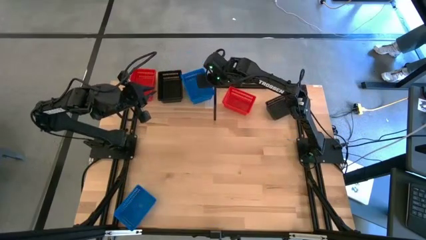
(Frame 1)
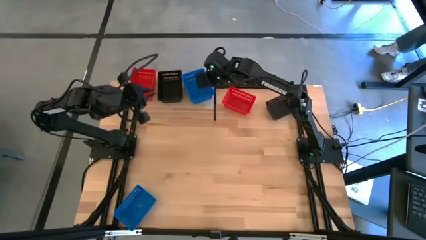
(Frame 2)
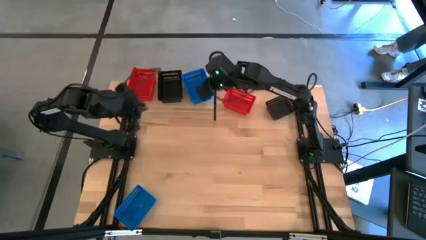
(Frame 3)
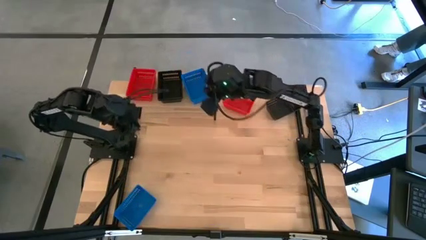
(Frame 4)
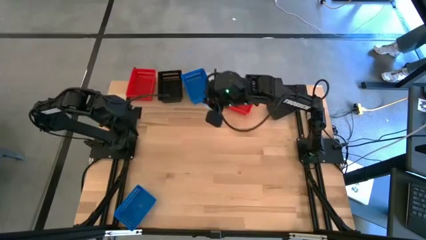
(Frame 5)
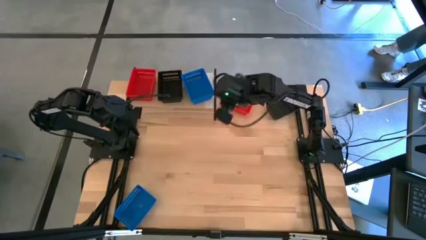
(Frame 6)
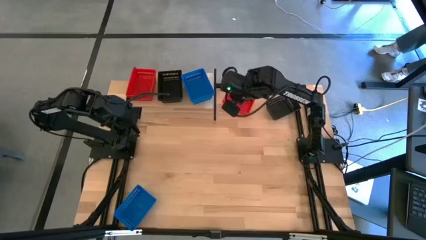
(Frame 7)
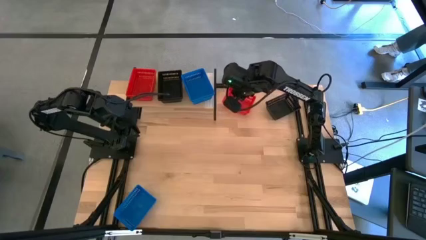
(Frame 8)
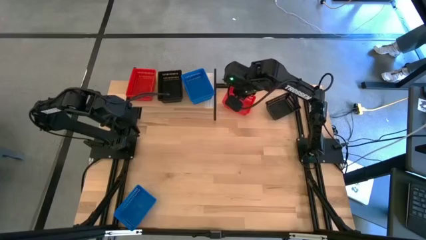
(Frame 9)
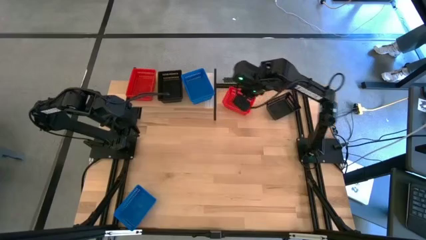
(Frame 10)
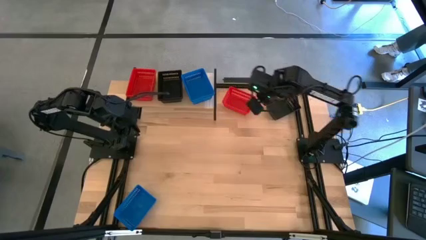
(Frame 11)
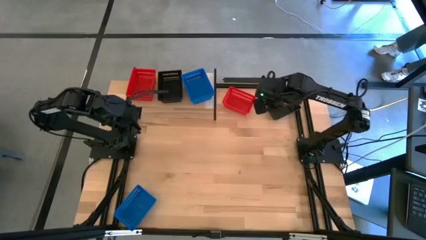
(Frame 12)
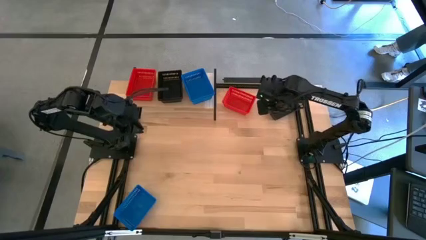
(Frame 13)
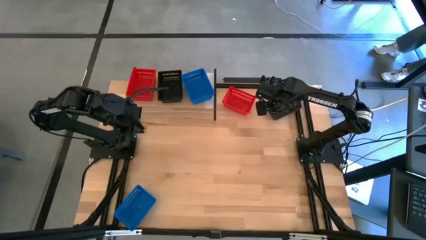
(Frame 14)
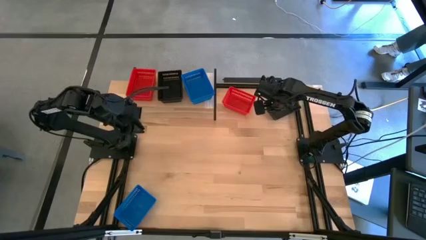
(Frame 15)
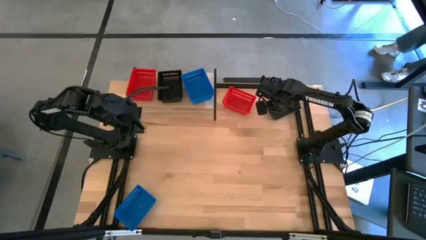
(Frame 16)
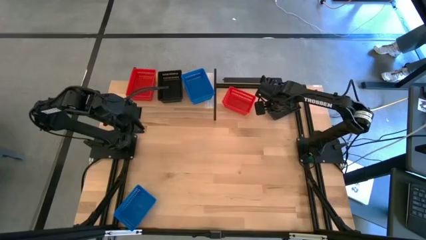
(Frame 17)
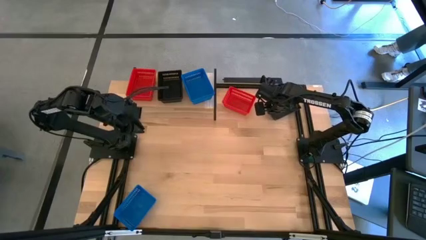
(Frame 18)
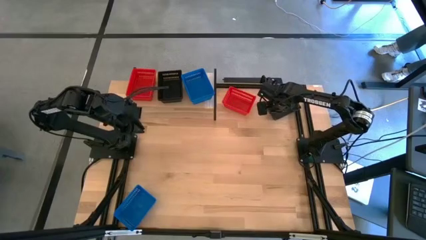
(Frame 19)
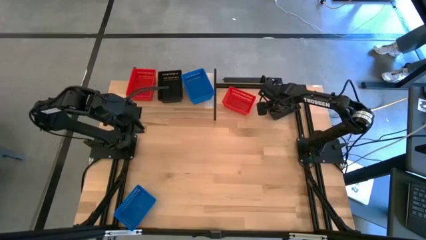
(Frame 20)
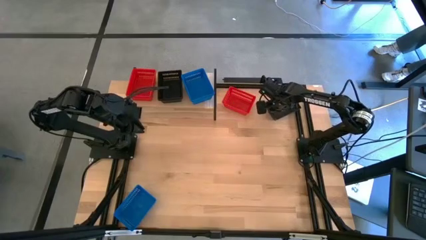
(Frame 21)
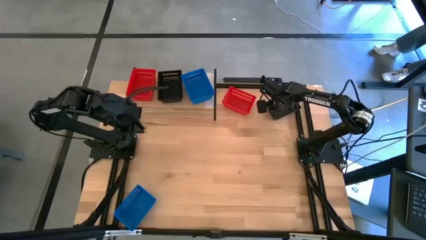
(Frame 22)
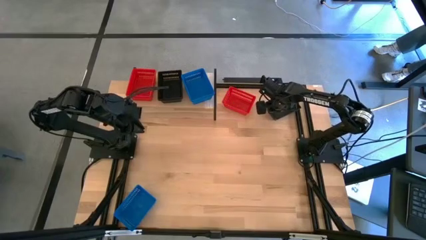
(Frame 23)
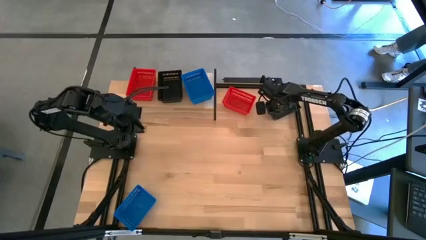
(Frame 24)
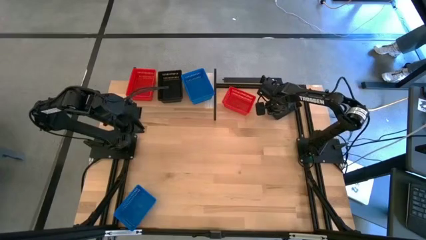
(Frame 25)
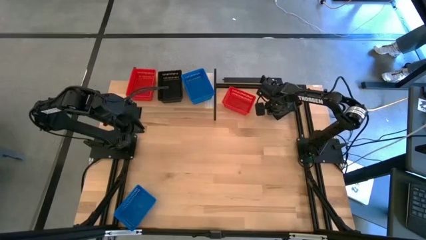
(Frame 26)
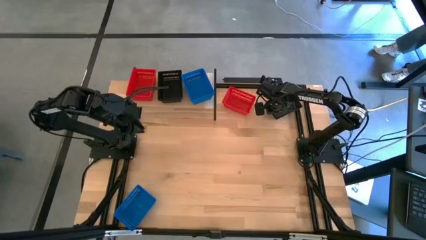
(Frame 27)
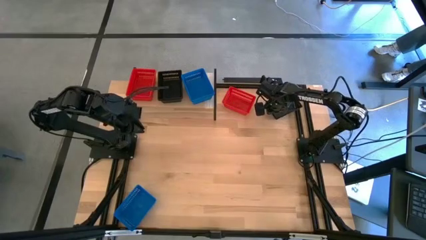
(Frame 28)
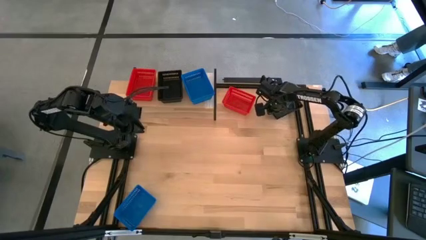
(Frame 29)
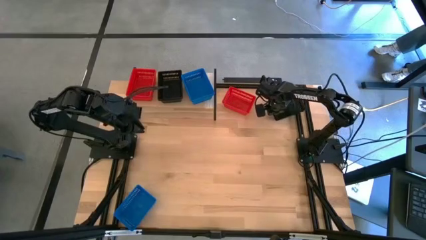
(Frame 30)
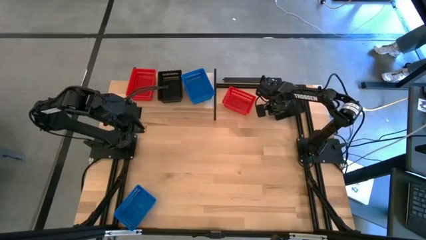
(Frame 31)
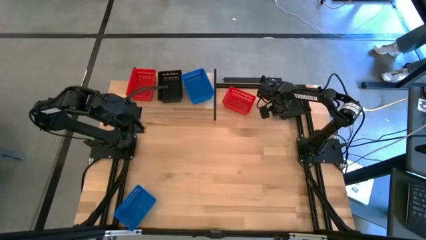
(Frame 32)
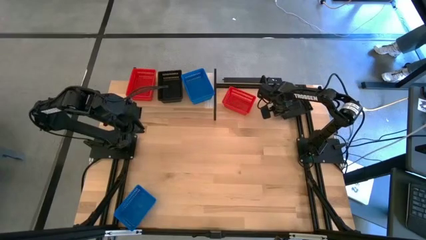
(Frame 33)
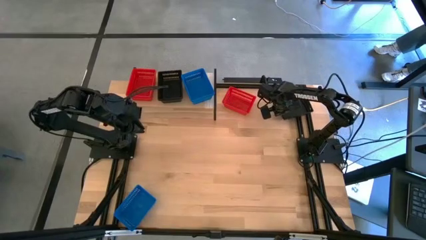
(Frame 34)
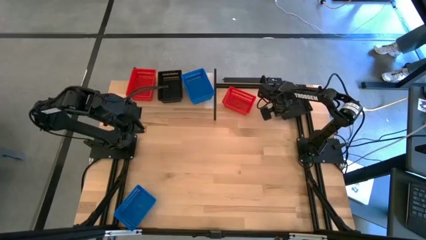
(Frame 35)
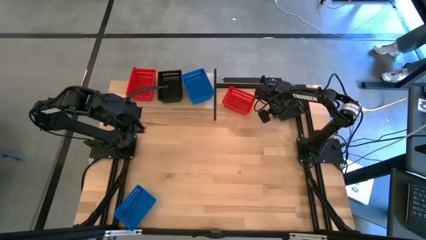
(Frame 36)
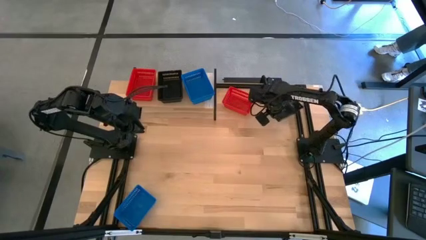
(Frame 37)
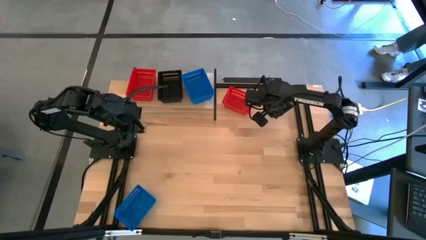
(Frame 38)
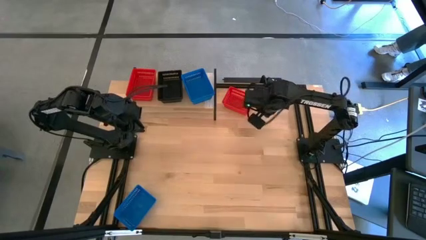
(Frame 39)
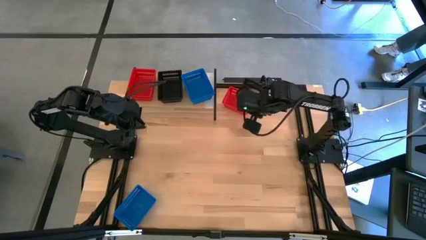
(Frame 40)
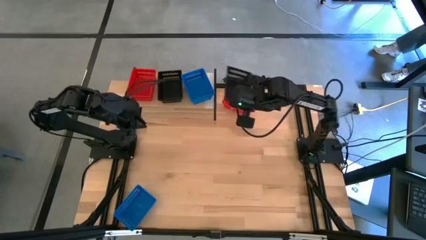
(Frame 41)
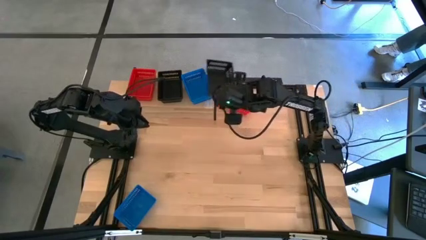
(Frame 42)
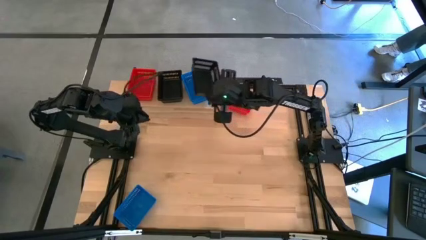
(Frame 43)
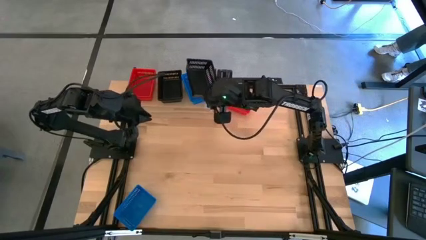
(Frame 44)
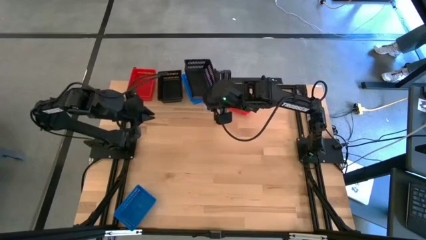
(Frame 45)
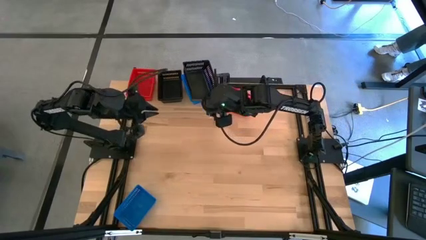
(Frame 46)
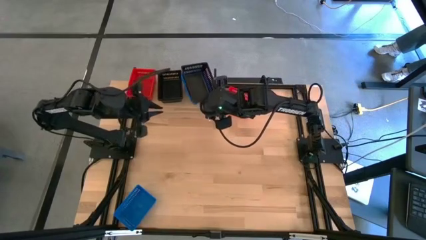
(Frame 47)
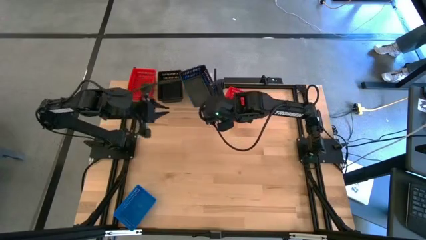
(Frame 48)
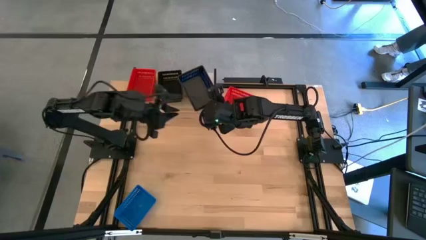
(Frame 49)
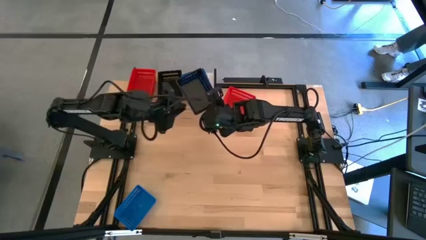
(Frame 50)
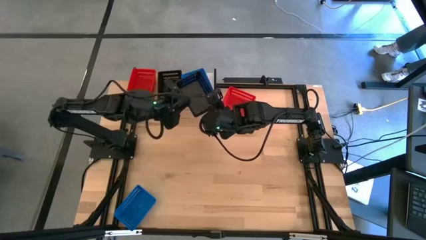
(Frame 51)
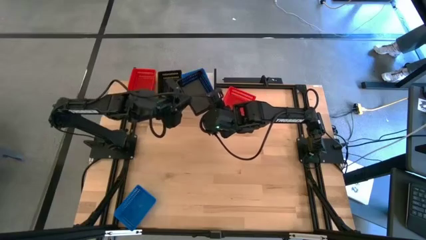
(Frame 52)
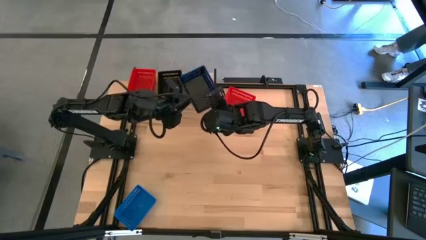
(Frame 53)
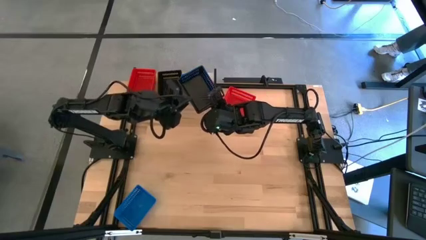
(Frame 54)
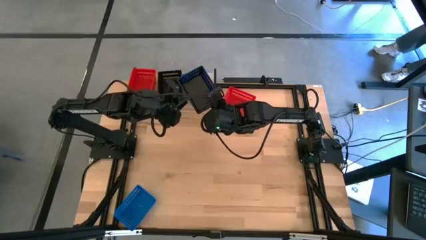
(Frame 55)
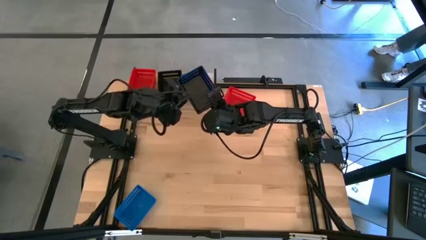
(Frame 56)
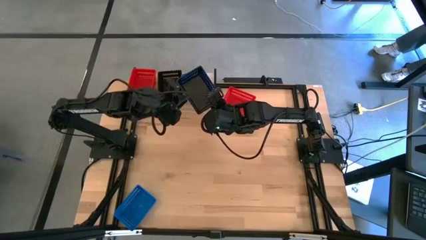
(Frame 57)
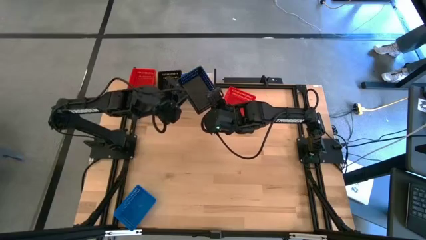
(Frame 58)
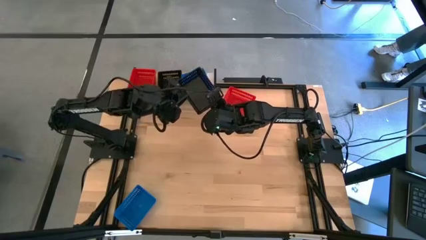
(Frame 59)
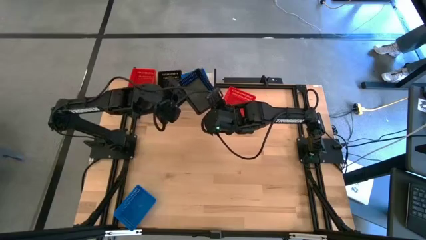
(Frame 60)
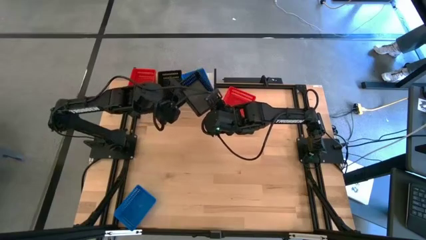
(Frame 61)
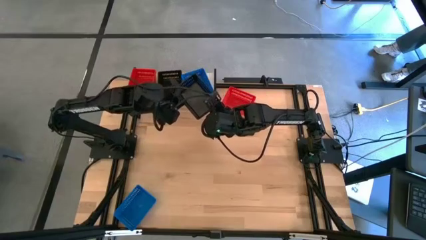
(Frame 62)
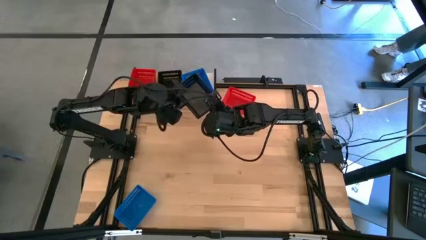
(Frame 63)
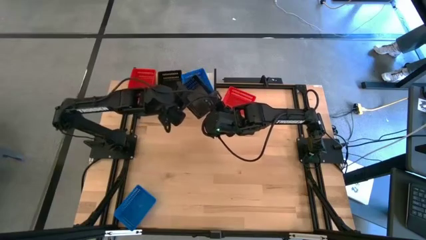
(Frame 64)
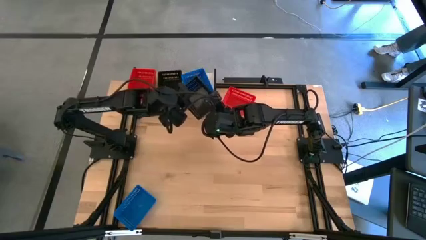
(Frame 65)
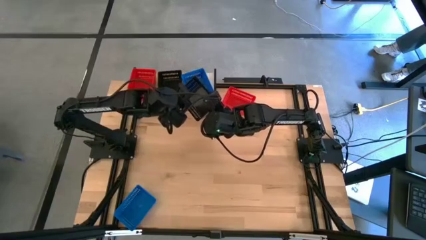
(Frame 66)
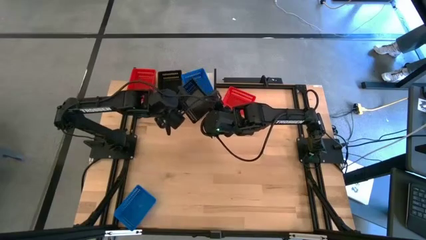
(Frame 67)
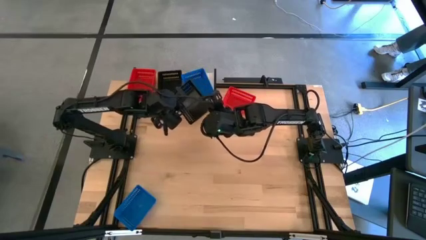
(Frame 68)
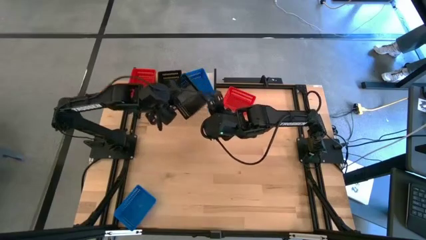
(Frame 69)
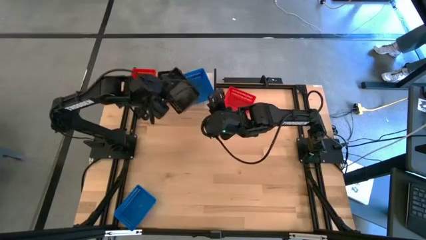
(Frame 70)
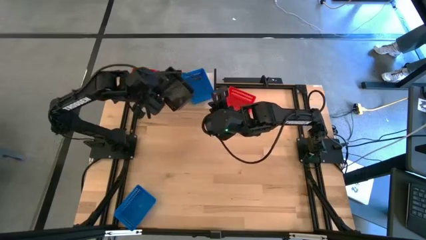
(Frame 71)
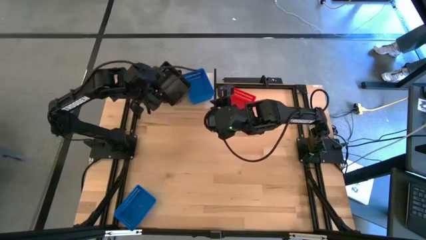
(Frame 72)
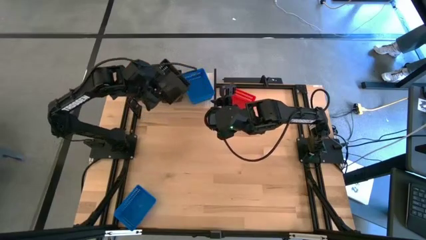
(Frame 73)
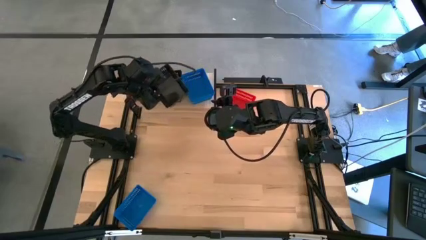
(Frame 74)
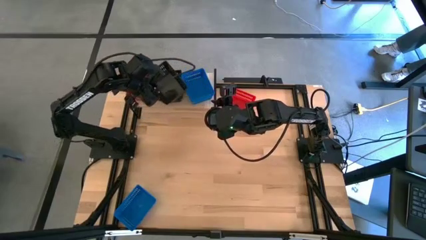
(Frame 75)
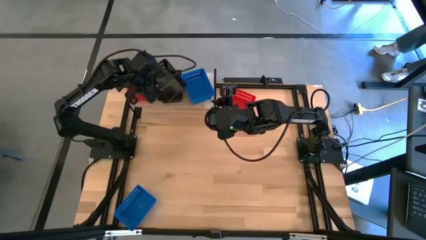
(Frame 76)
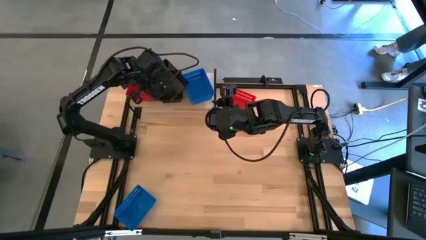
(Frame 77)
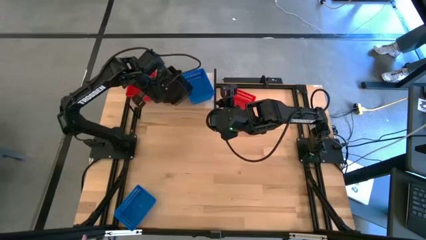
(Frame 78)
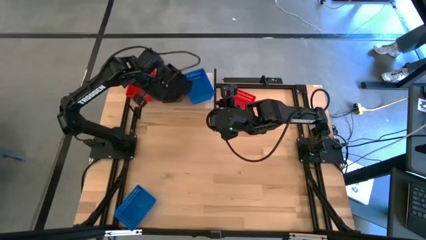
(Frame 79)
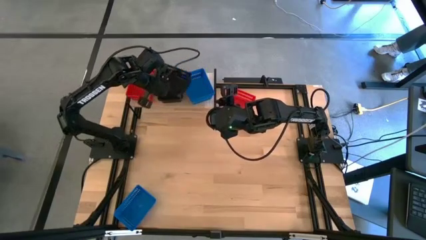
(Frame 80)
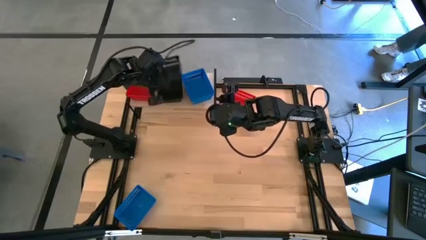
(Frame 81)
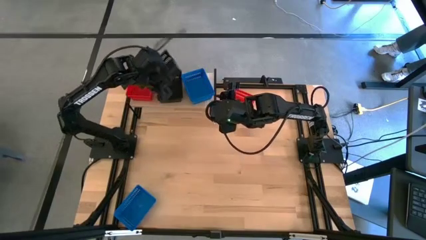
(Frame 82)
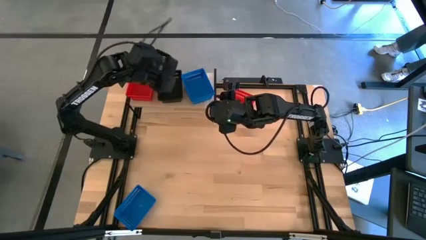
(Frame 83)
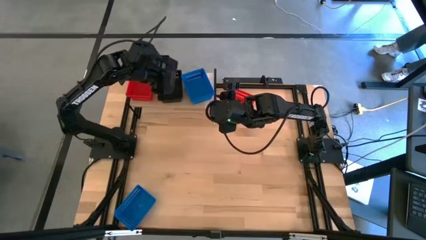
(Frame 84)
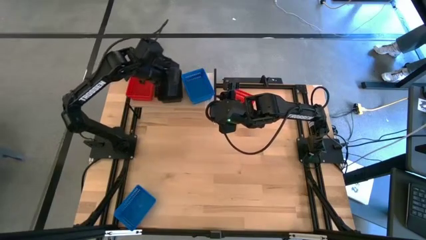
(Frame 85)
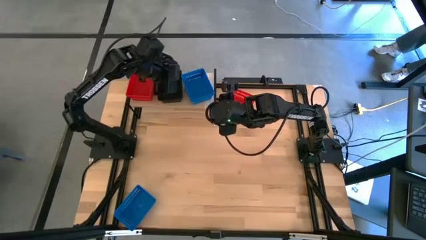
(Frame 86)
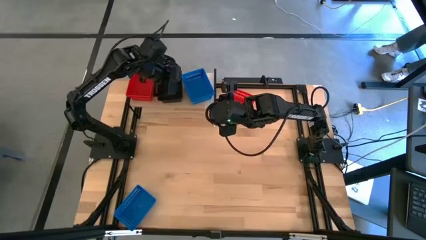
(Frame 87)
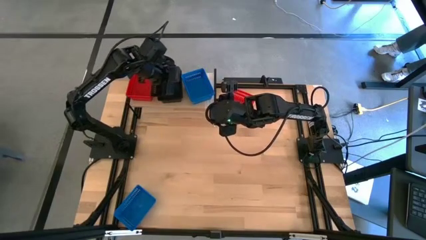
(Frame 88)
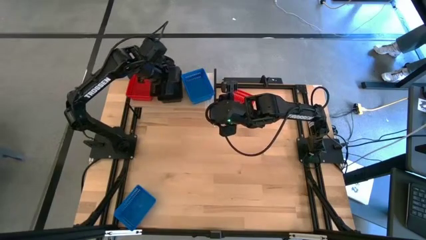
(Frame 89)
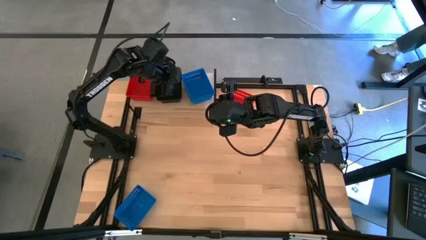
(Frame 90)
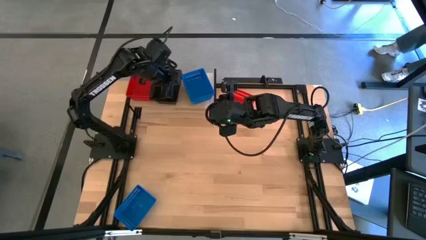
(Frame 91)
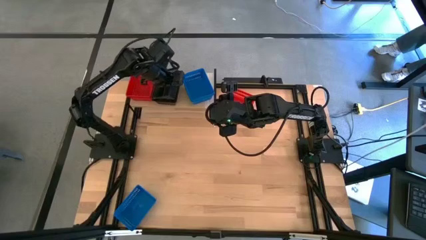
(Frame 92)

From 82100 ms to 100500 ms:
Task: Stack baskets on shelf by color
Stack the black bin on the stacked black bins on the shelf
